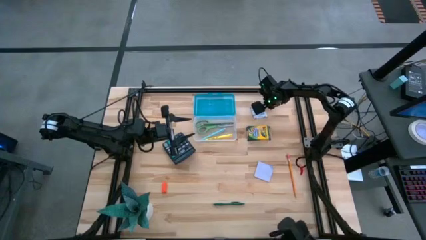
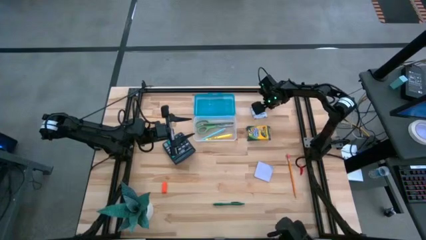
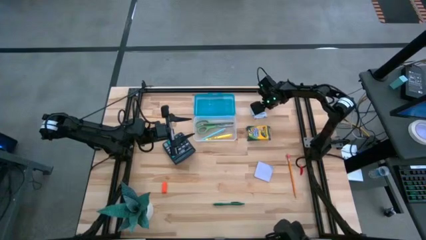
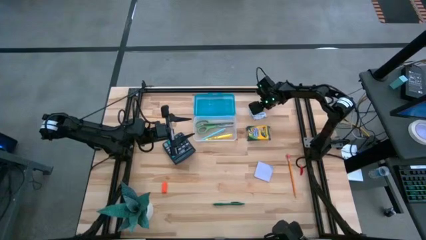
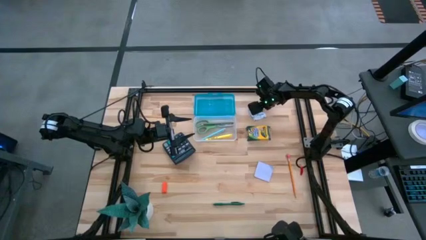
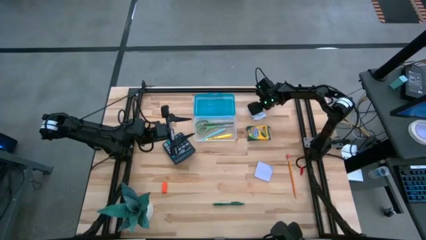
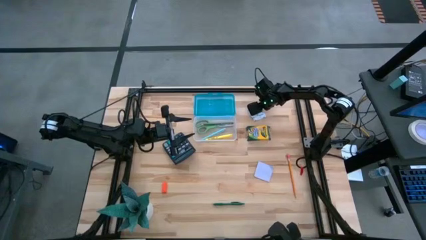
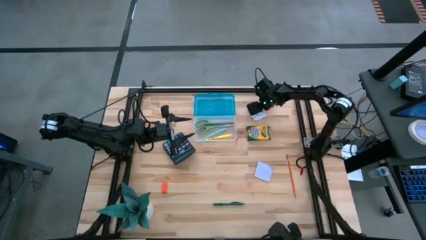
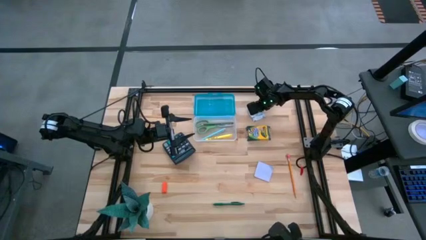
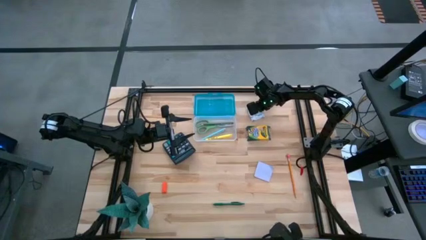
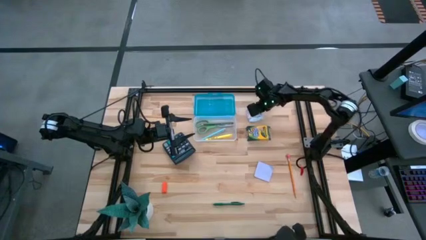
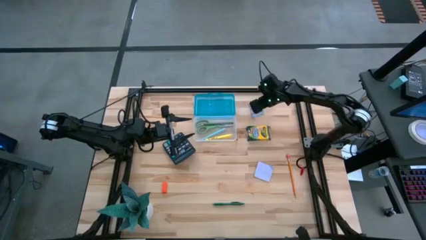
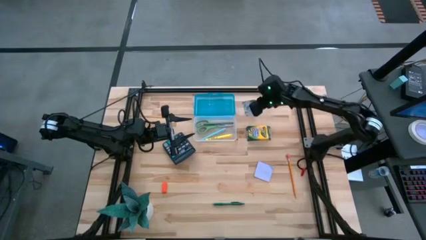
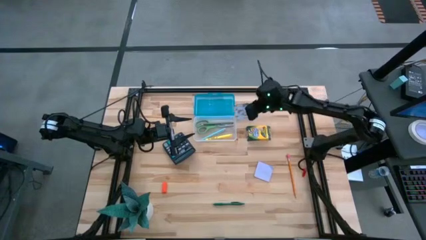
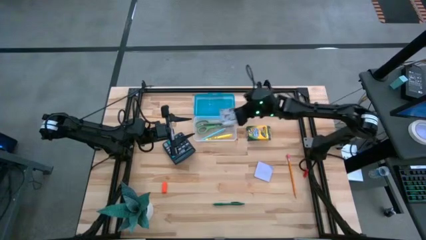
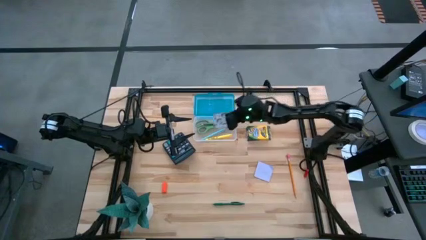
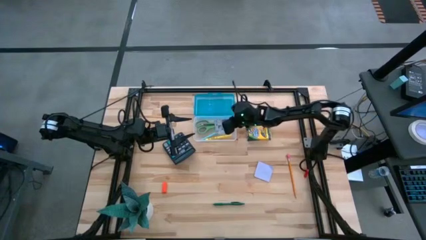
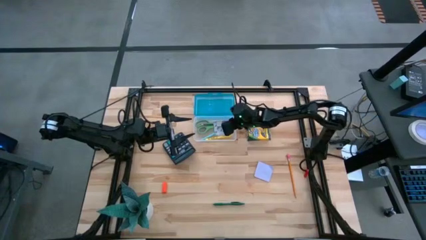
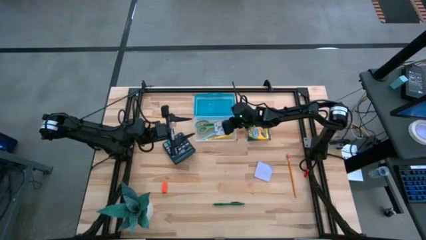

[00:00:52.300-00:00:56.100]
Task: Pack school essentials
Put the white sticky notes into the blue supply box

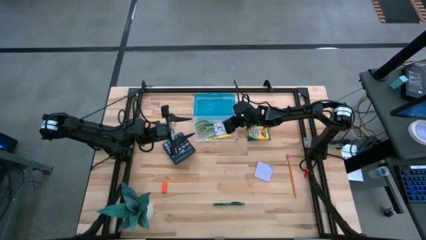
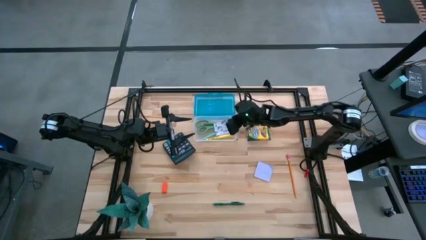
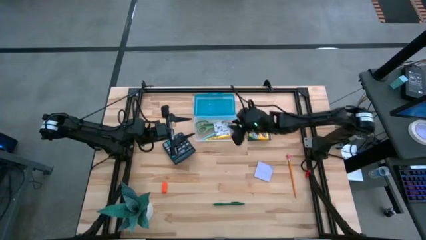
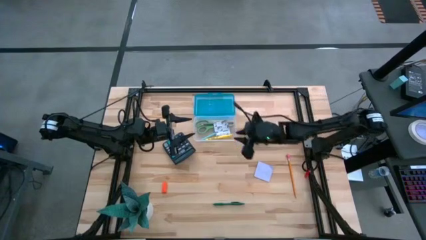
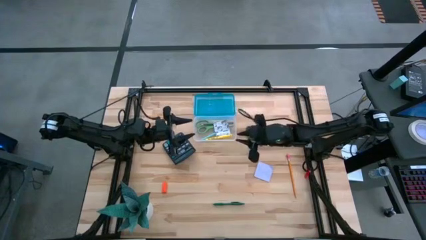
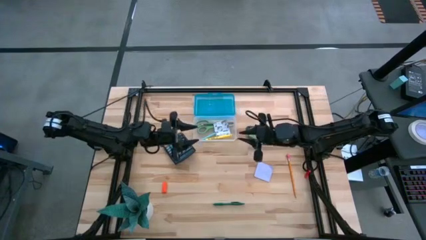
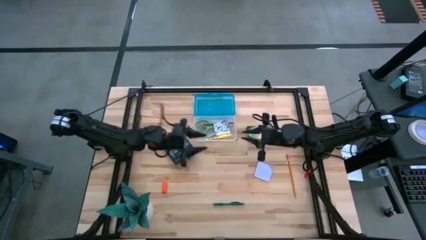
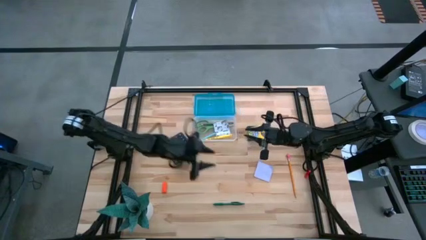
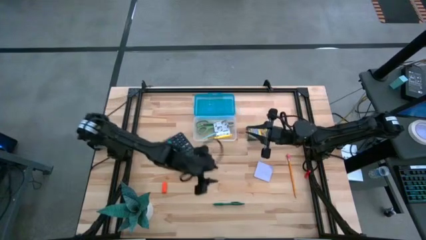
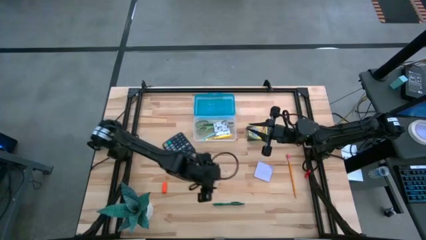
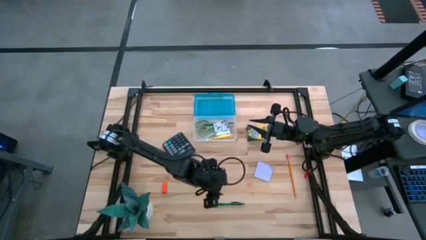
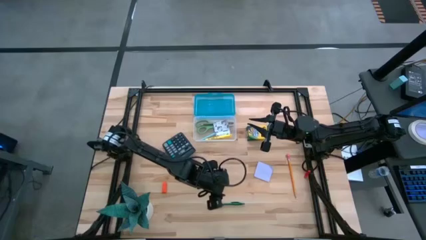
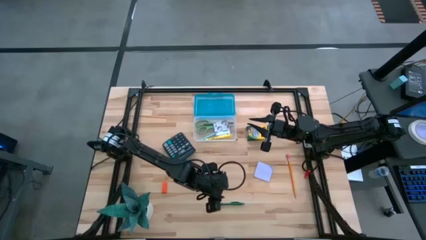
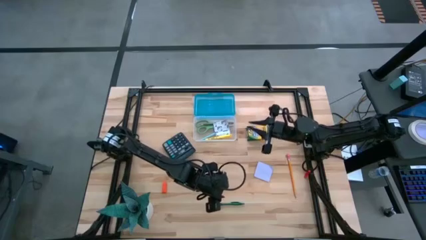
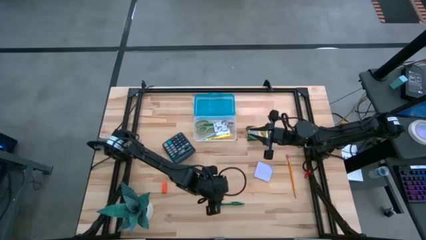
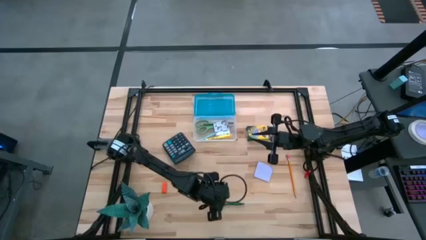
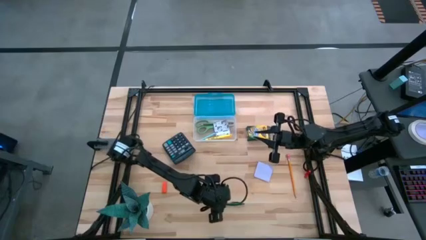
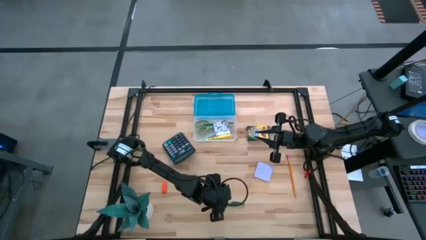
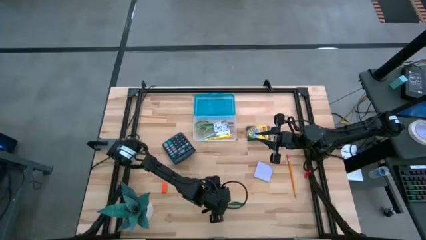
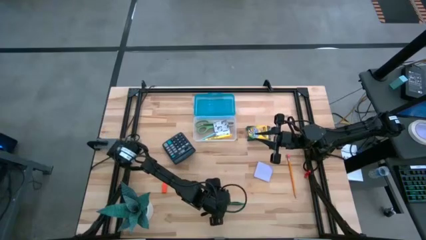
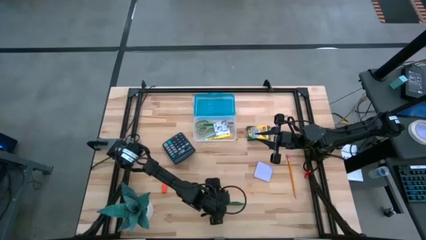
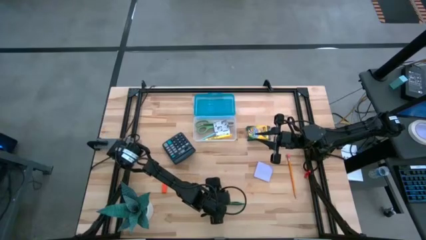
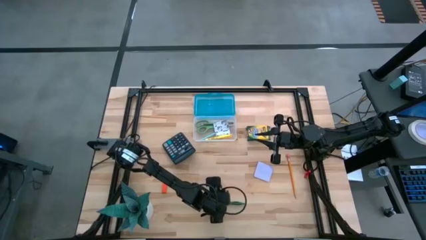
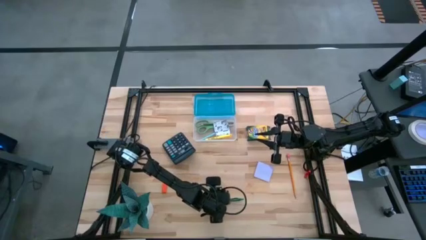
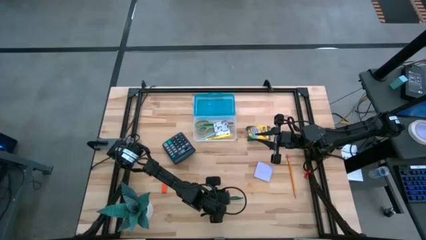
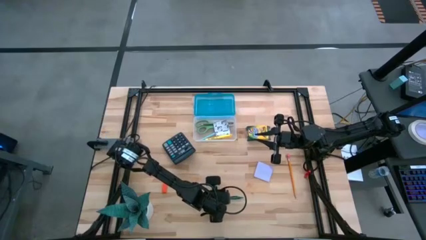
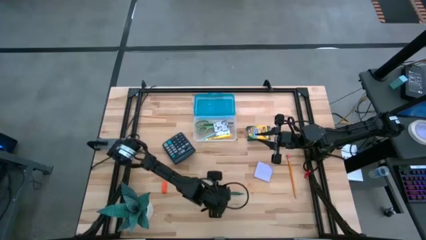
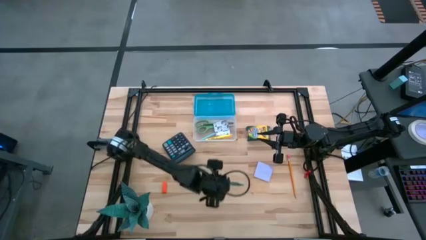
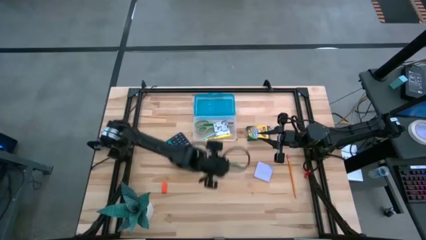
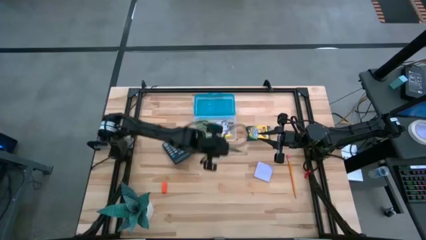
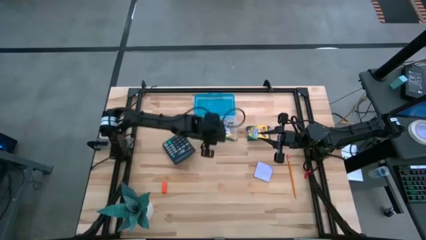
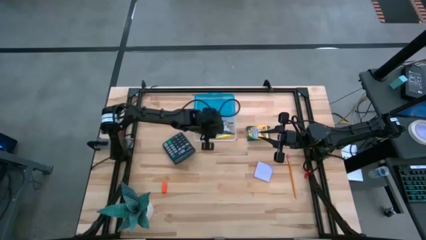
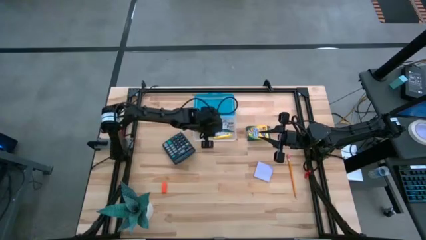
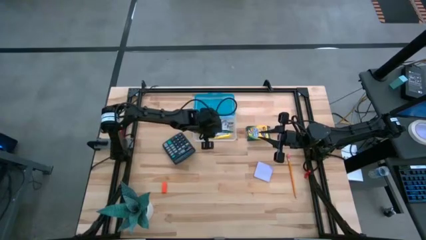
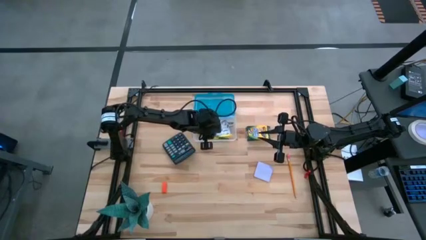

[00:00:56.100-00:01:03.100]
Put the green pen into the blue supply box

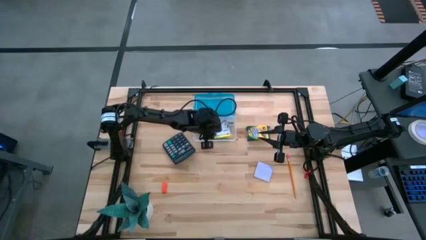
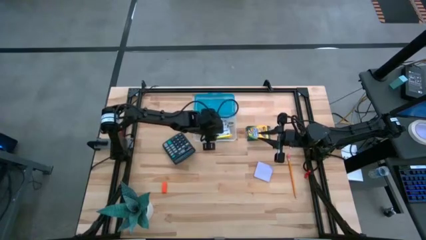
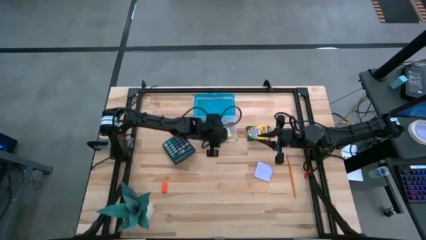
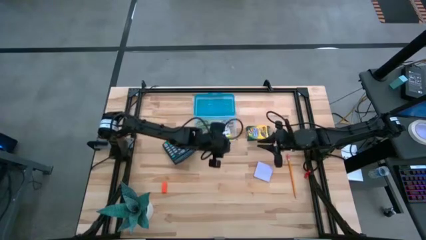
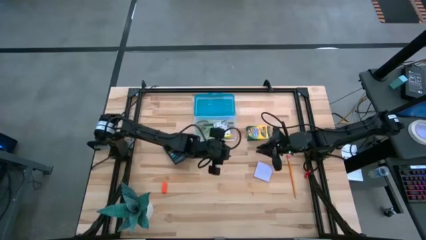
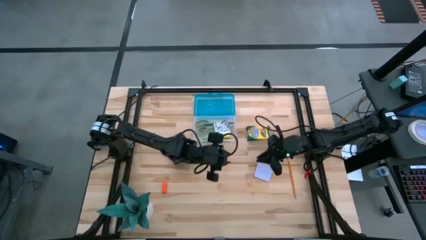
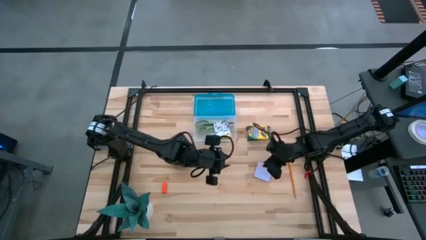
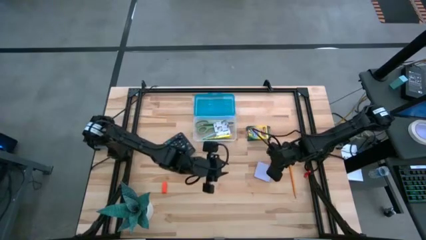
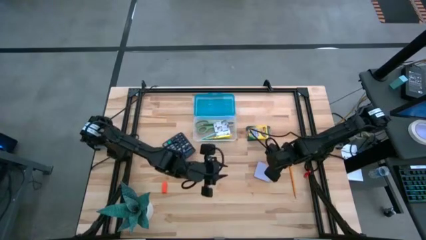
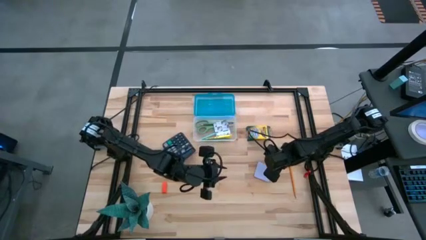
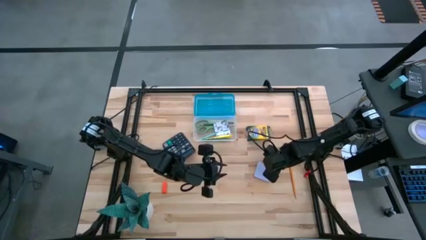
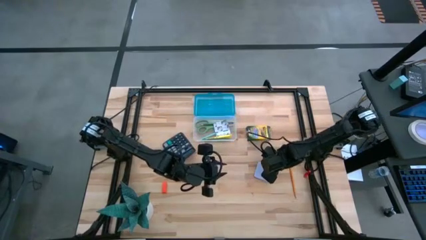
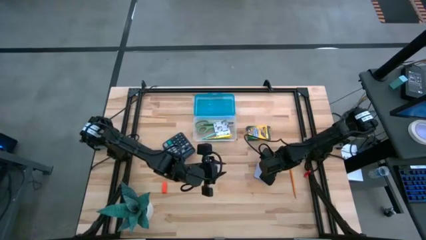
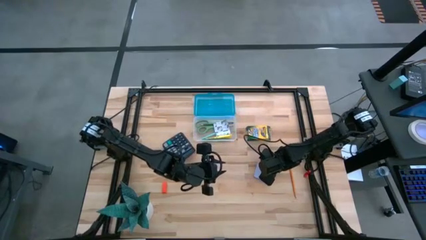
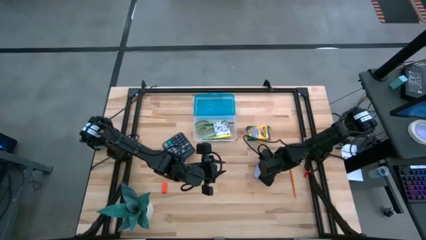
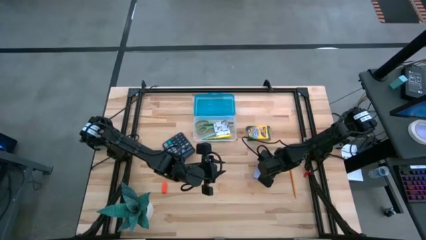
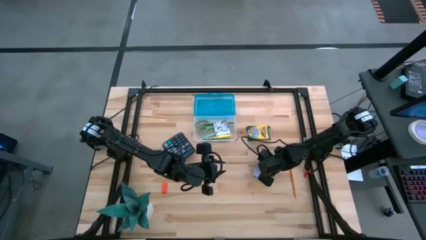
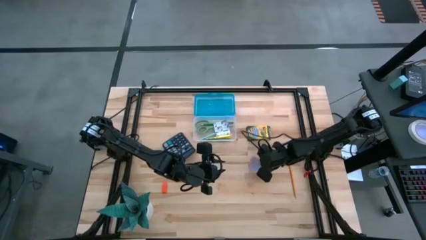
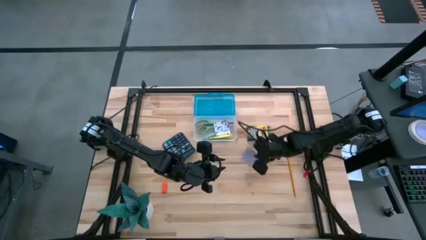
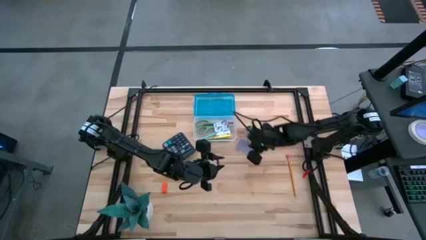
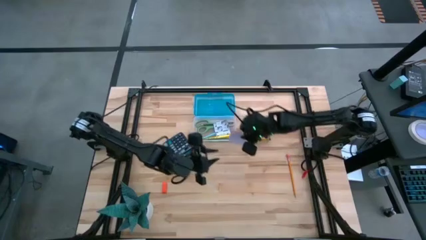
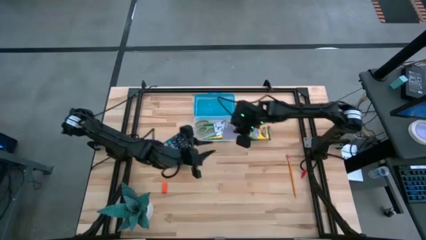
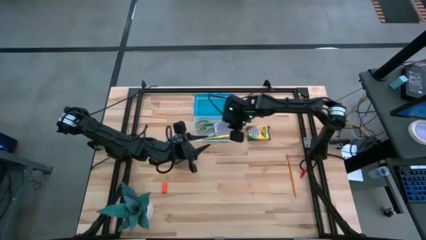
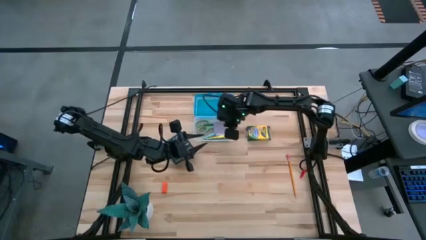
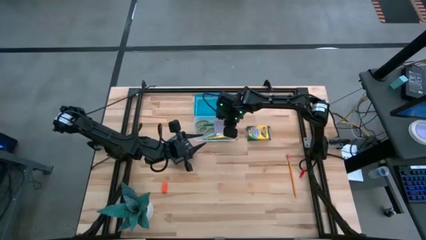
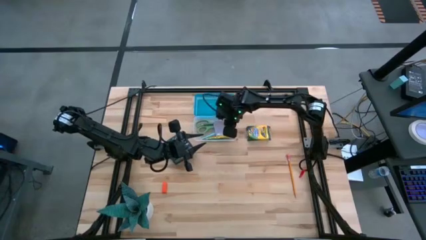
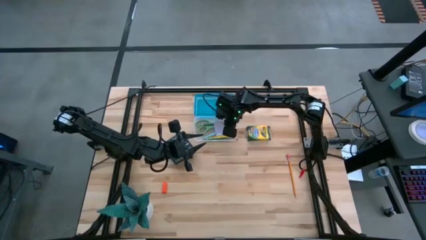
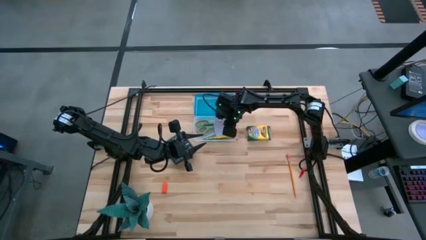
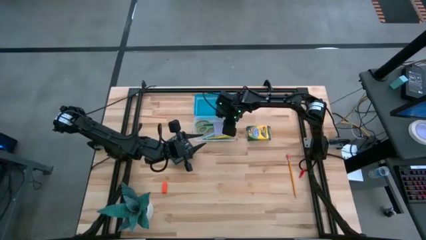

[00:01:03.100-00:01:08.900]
Put the purple sticky note into the blue supply box
